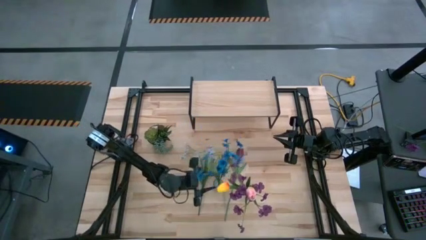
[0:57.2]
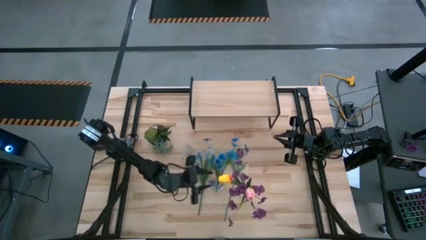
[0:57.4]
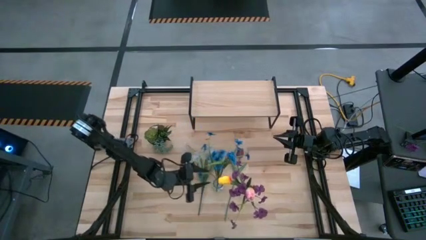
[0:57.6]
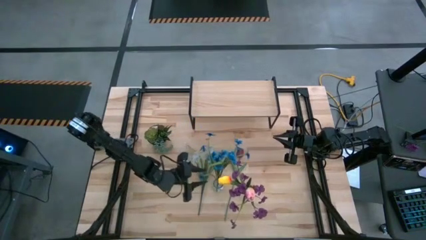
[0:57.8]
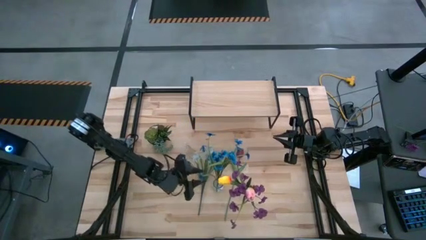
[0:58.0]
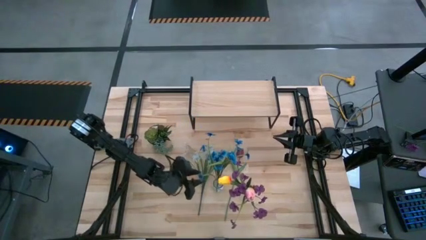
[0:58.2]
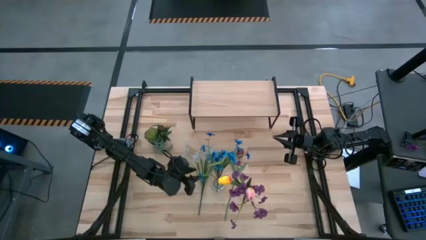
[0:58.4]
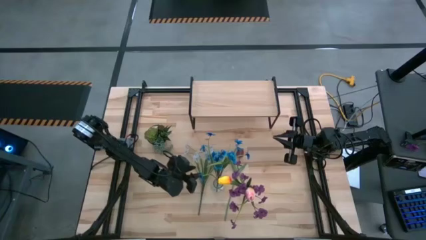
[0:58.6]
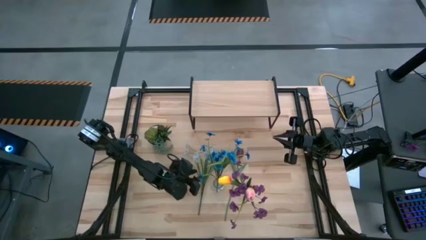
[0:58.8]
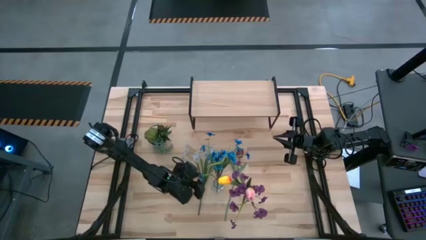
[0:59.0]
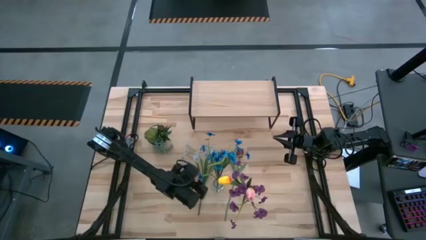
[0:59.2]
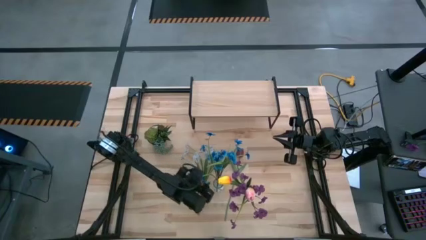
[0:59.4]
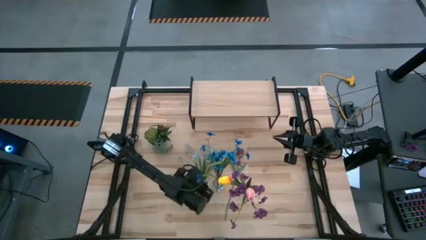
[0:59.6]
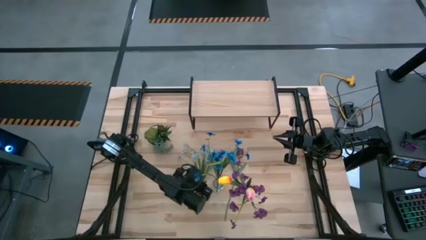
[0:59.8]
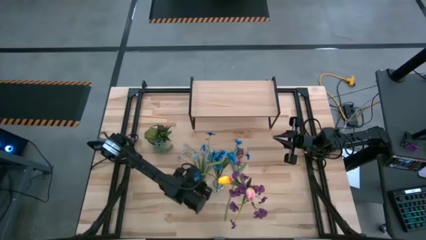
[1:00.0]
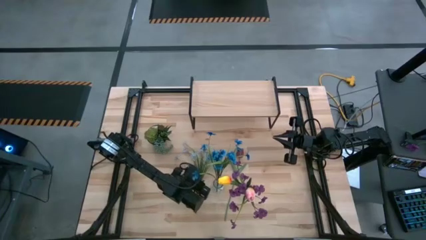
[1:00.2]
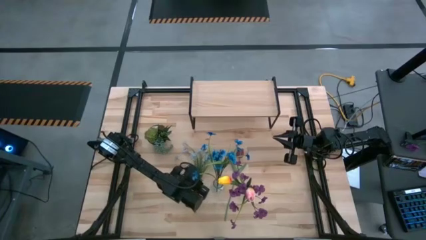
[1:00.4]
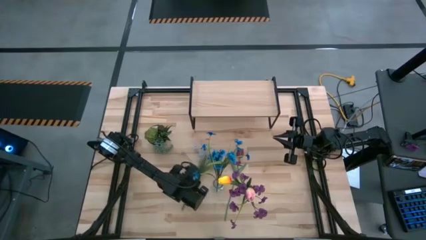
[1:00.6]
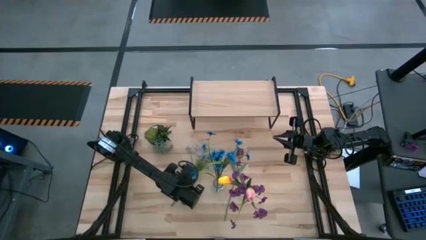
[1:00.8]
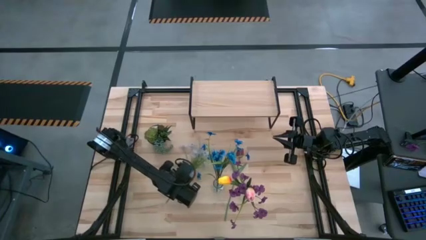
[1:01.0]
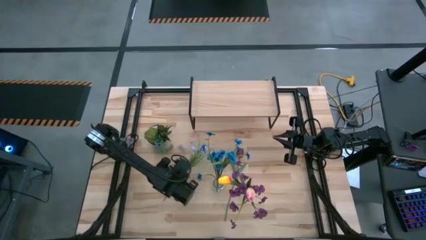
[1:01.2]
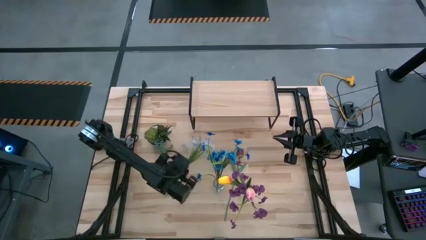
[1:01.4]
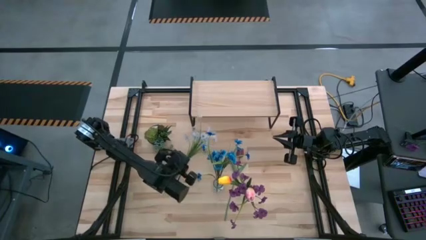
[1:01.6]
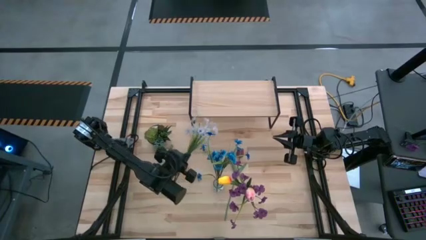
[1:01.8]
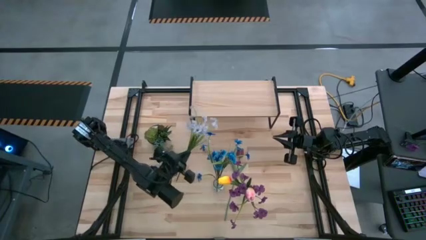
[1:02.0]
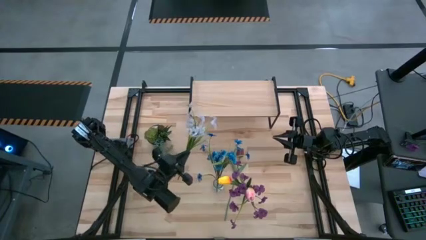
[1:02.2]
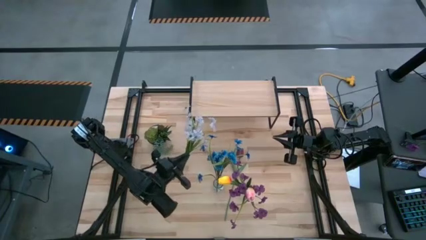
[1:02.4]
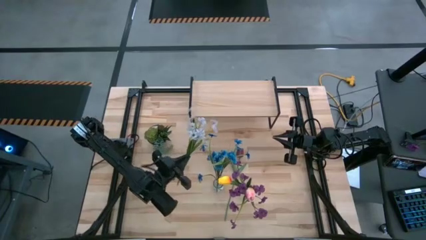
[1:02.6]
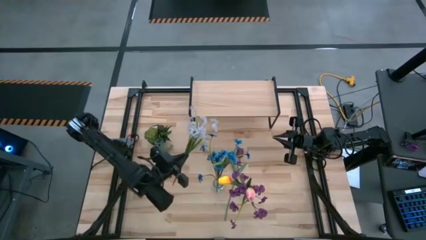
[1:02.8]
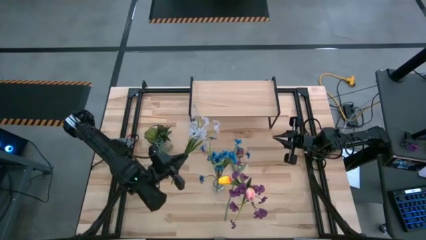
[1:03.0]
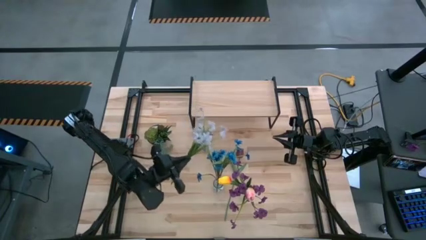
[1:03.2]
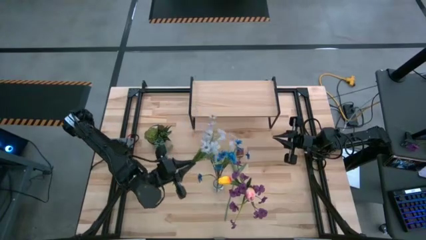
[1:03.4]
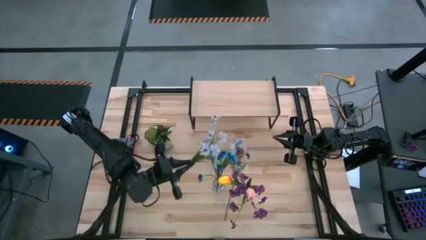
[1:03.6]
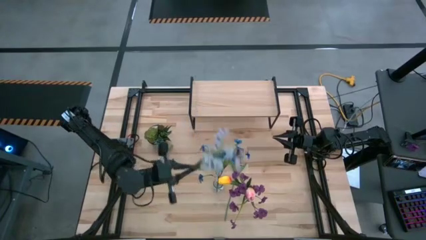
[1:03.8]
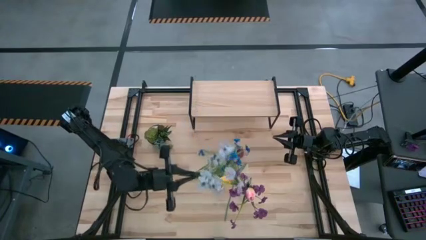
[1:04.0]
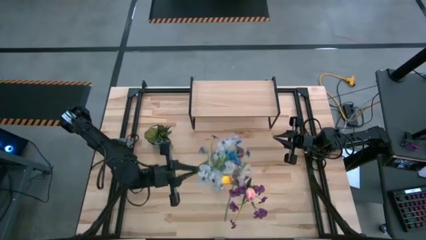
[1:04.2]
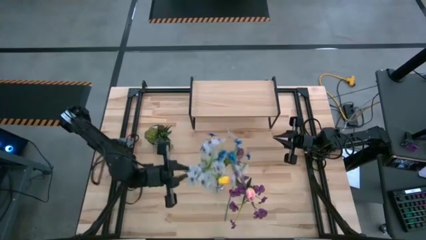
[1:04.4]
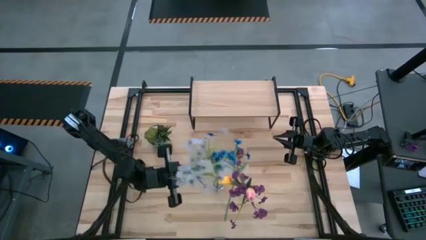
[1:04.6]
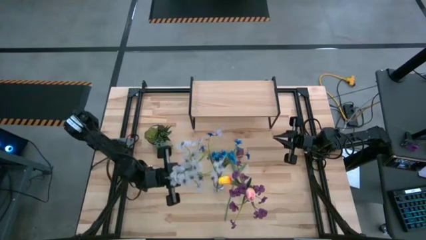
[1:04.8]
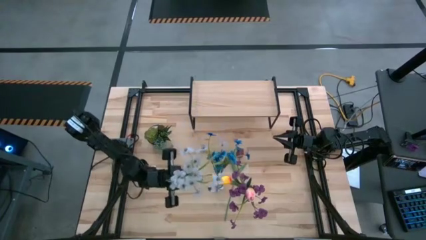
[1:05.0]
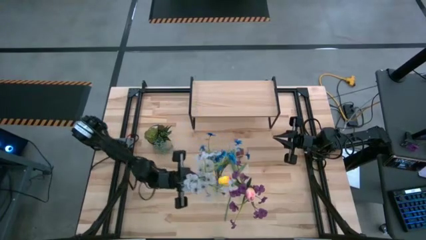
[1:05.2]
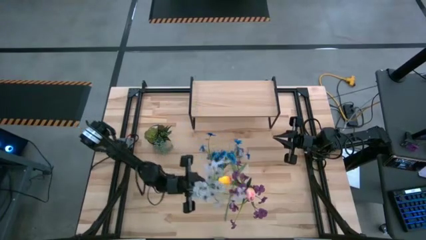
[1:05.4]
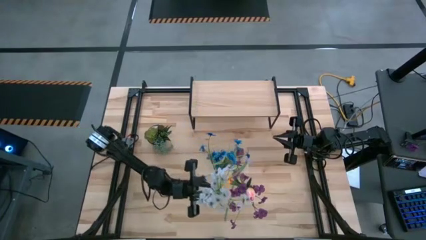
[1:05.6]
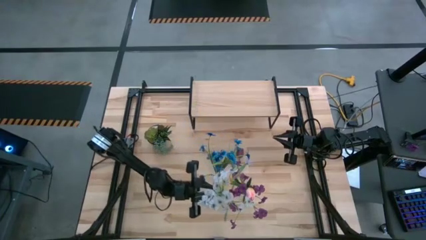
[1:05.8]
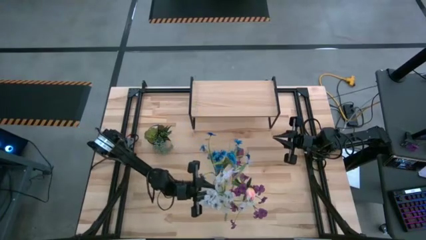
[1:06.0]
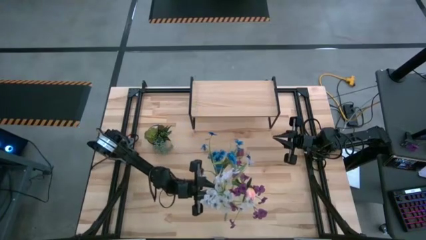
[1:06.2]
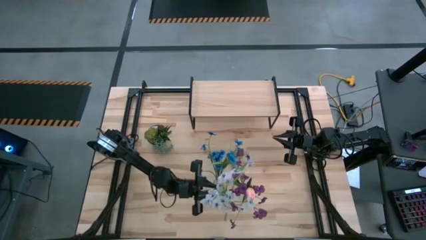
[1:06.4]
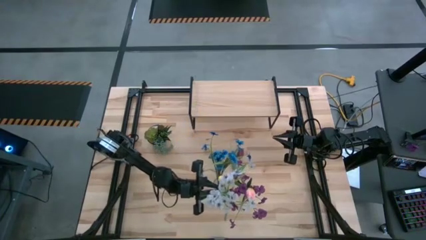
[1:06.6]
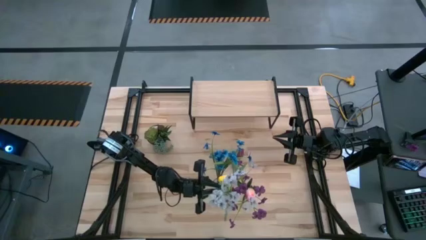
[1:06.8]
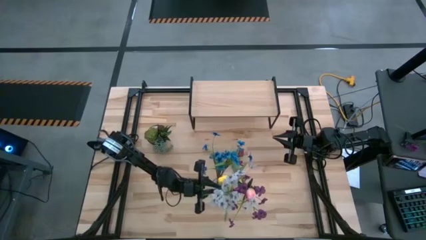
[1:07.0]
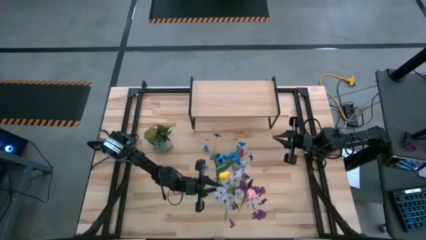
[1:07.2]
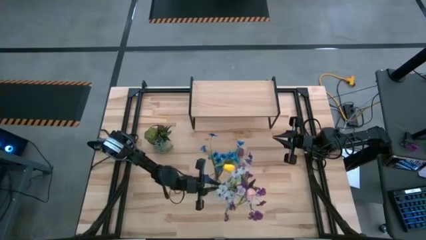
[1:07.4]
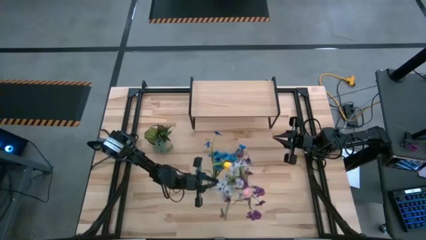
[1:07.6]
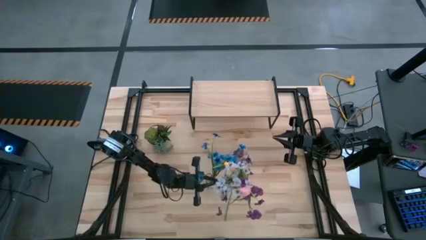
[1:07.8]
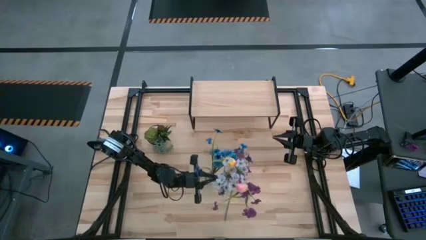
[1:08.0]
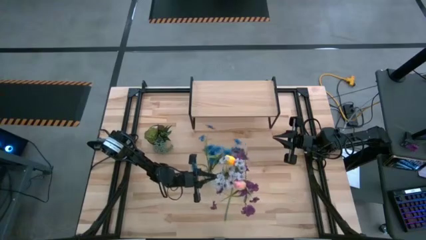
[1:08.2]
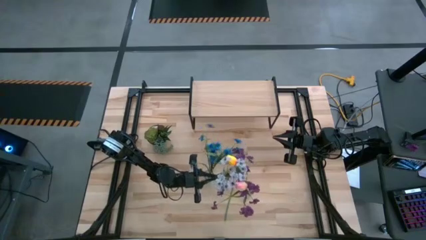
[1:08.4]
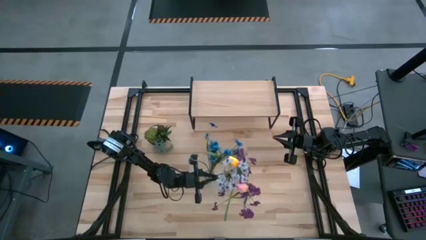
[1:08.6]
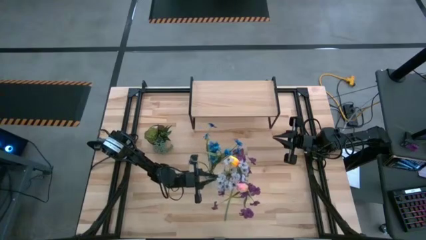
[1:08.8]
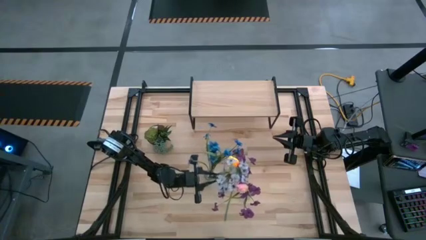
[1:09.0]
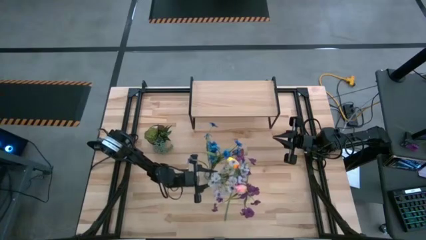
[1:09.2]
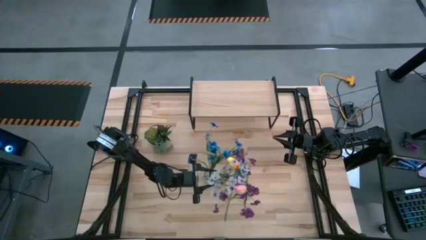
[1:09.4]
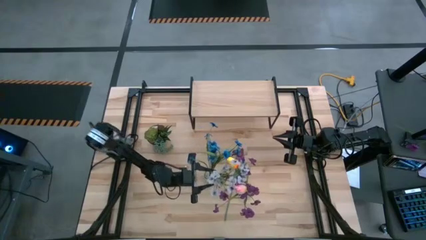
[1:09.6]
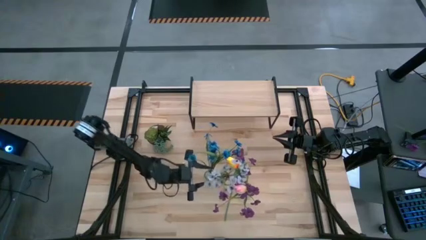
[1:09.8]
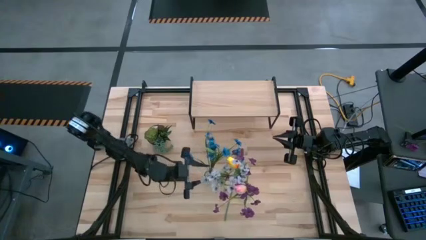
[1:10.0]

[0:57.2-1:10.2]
Task: Pick and place flowers into a vace then onto a shelf
Put the white flower into the left transparent vase
